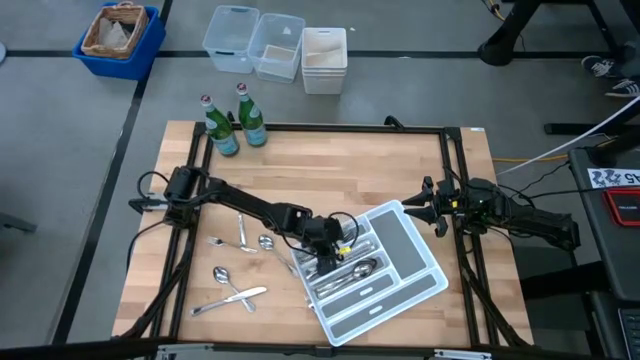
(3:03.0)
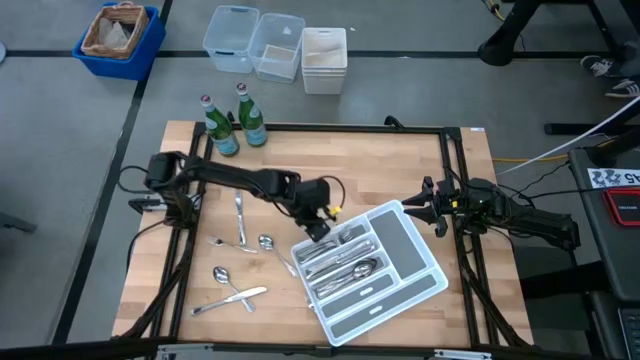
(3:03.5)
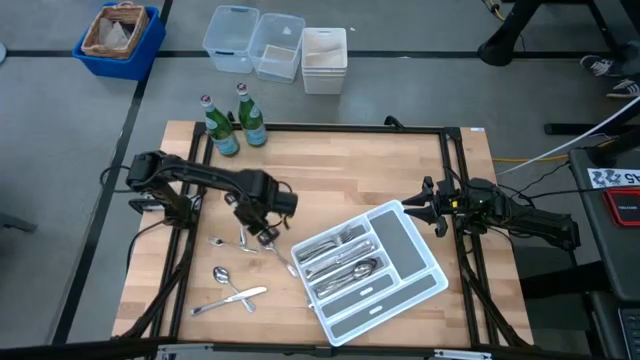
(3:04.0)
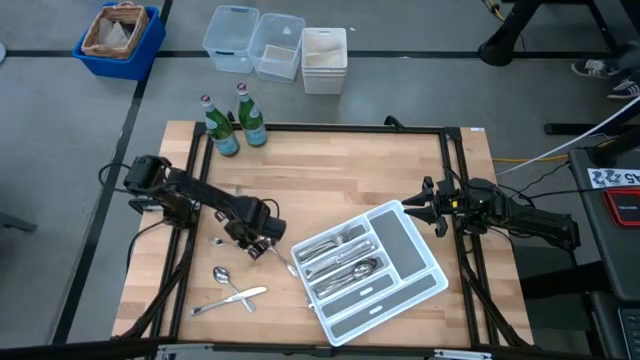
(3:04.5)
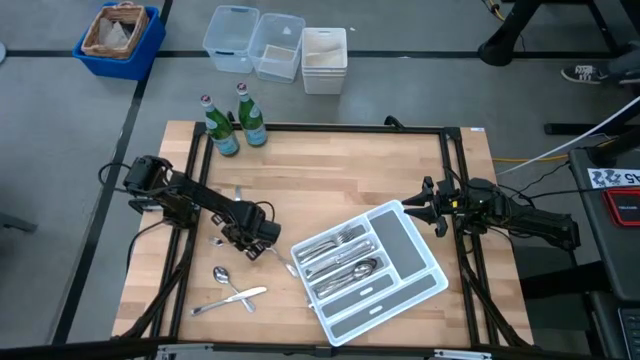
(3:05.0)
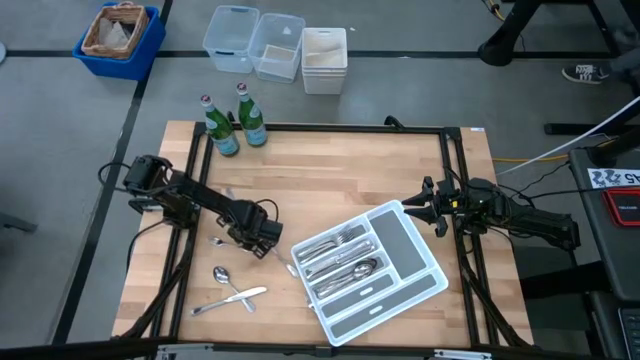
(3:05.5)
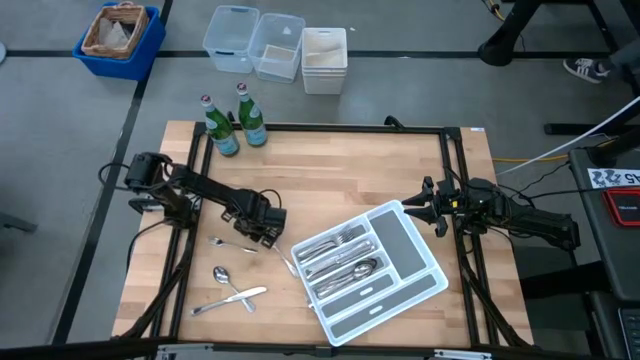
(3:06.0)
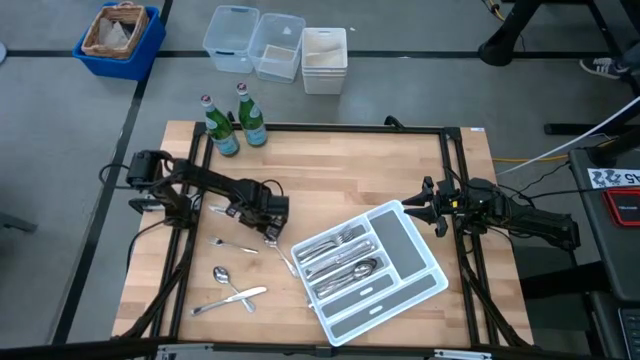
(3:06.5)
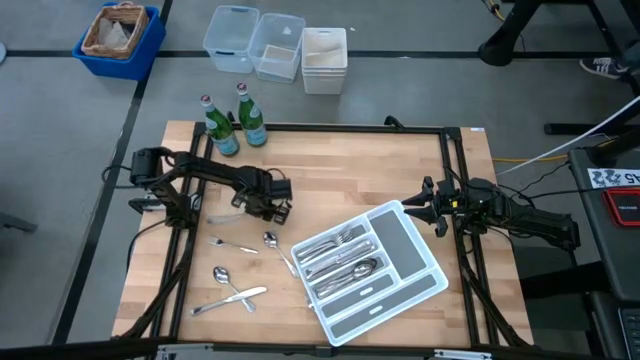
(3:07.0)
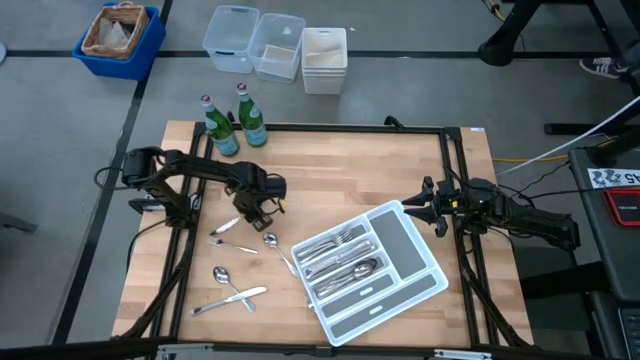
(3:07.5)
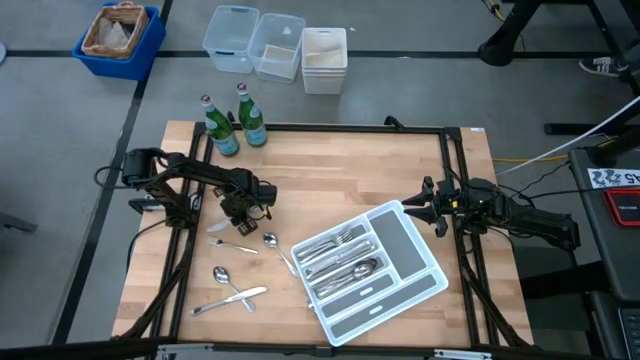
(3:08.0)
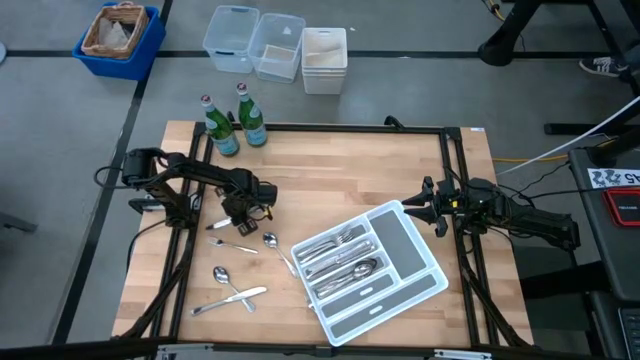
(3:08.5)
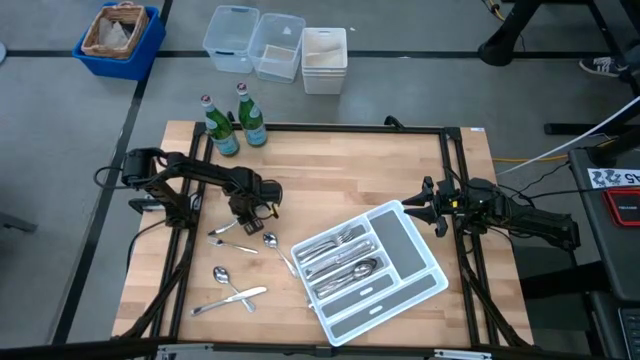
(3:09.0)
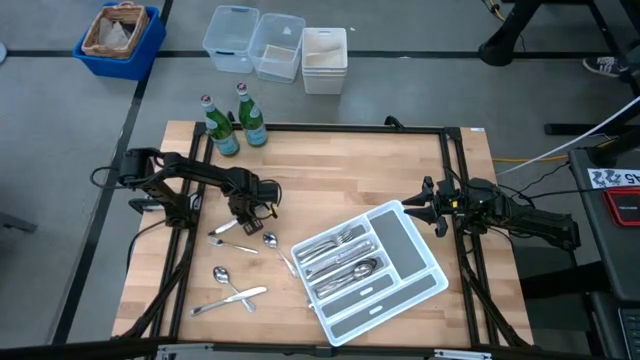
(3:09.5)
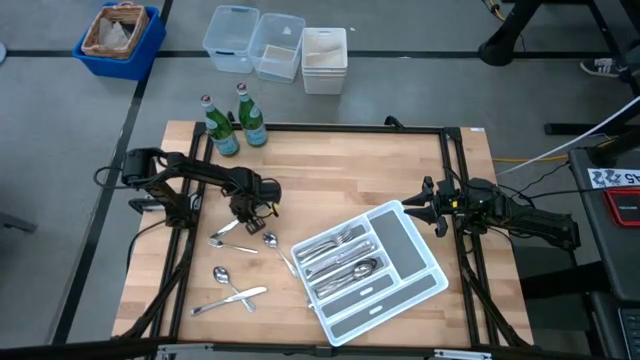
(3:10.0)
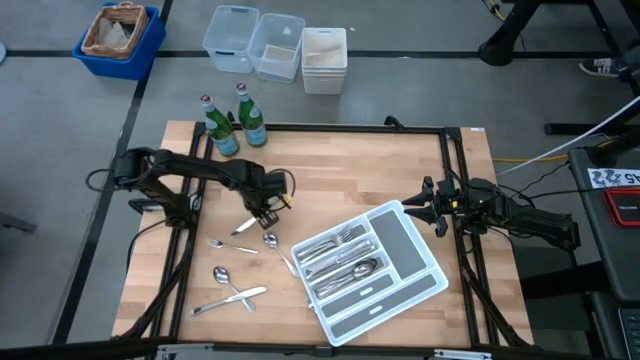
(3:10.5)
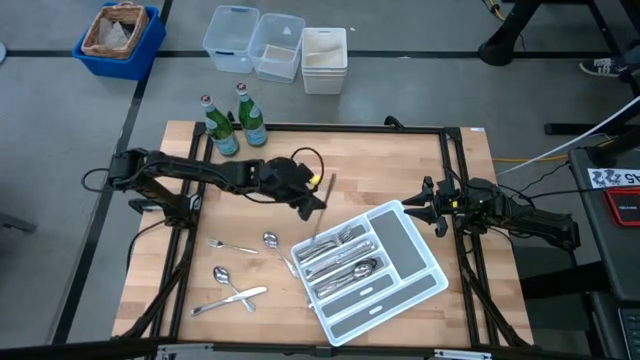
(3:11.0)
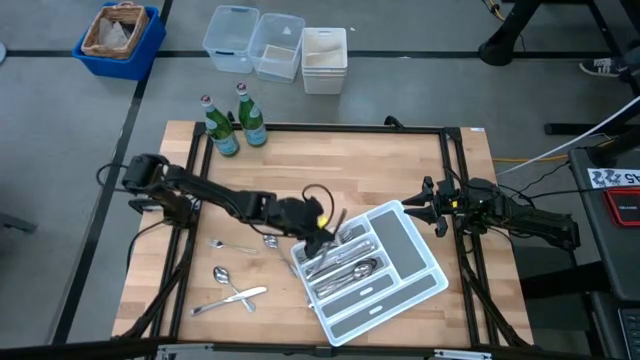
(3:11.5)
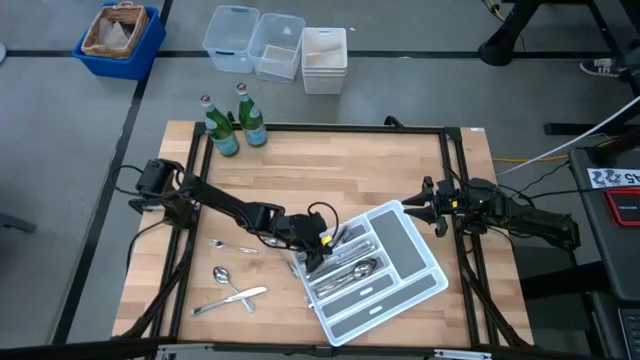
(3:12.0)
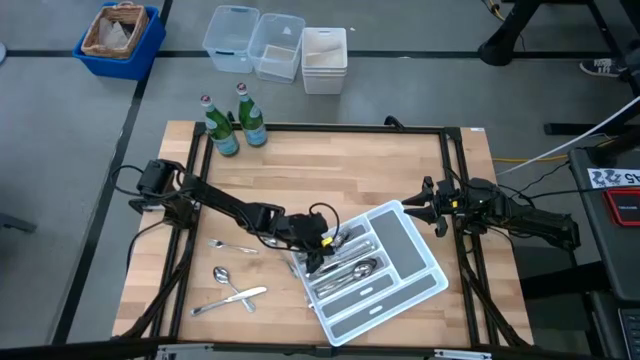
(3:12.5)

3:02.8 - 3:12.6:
Task: Sort silverware
Put the silver table knife into the white silverware tray

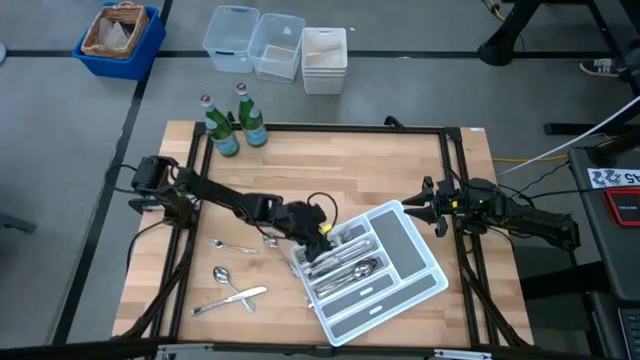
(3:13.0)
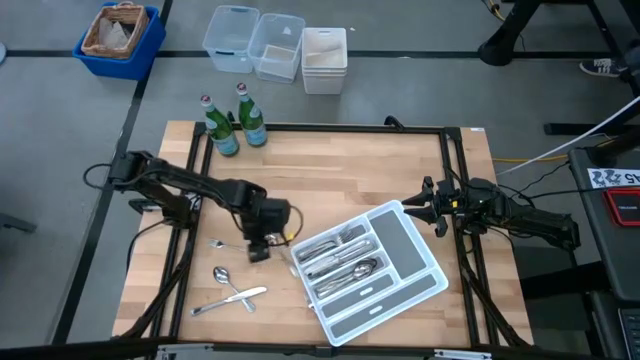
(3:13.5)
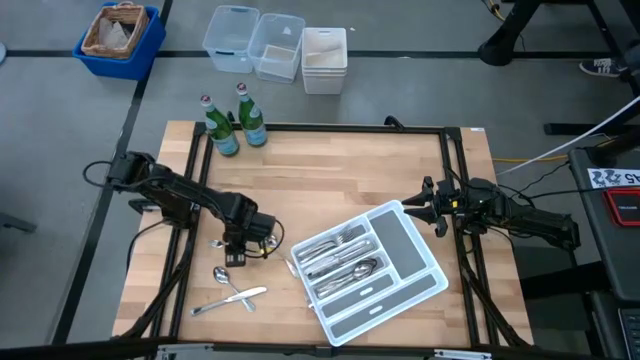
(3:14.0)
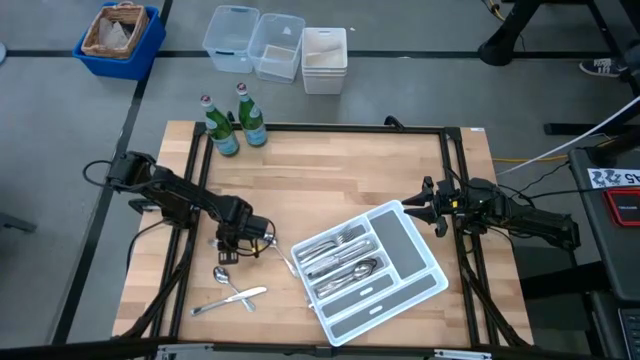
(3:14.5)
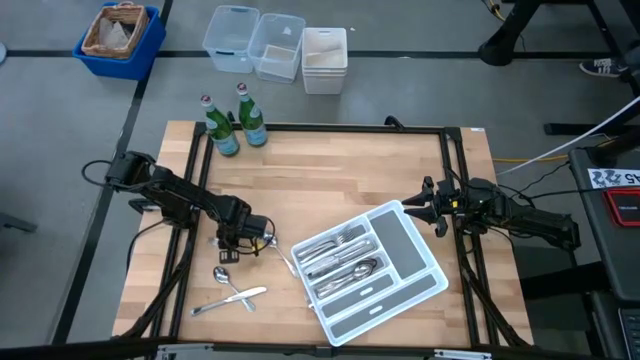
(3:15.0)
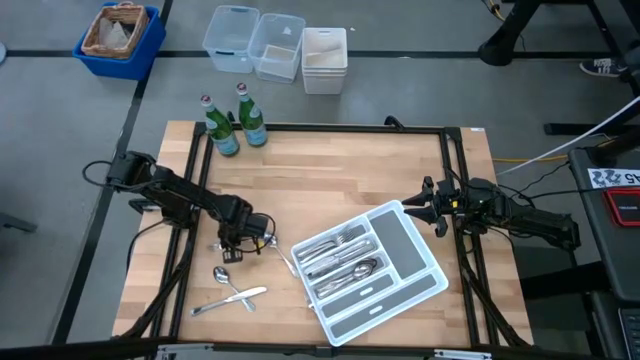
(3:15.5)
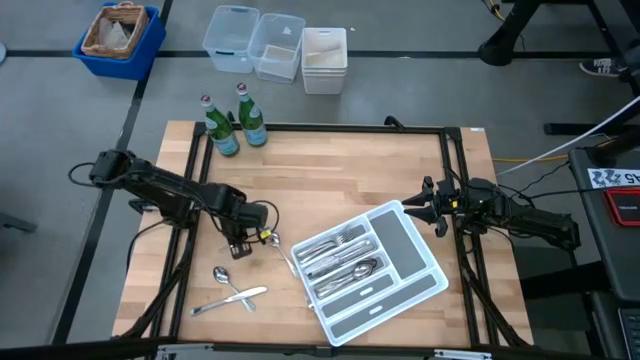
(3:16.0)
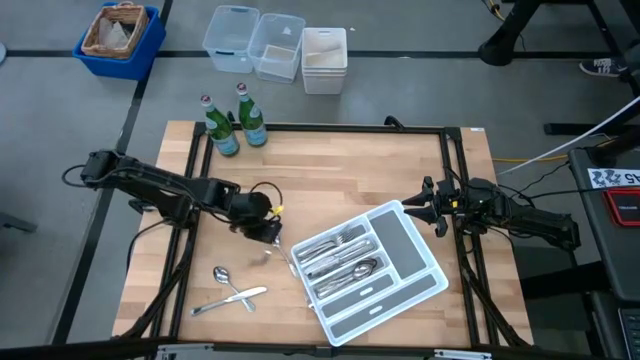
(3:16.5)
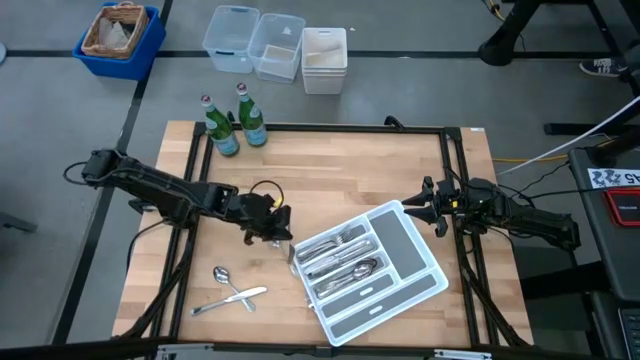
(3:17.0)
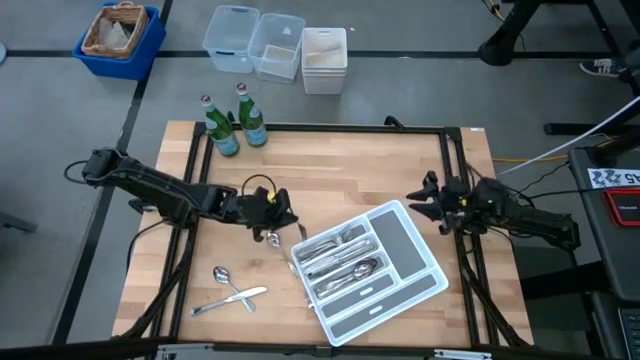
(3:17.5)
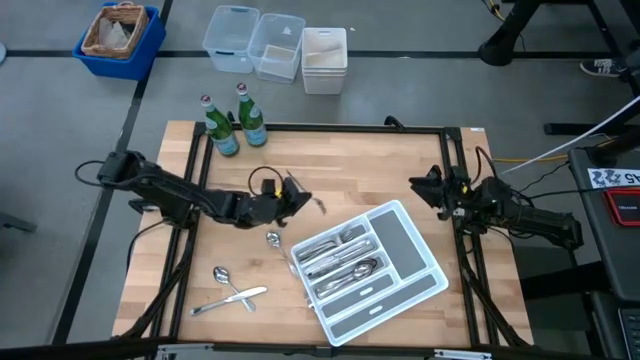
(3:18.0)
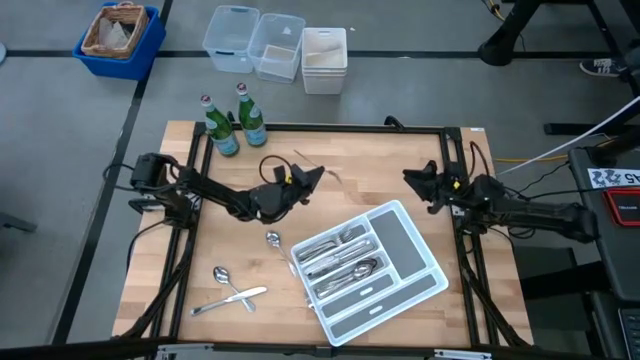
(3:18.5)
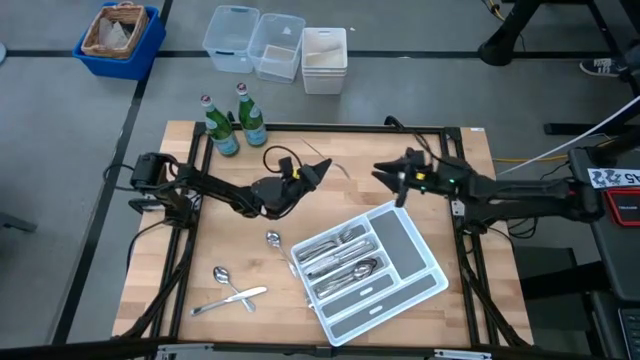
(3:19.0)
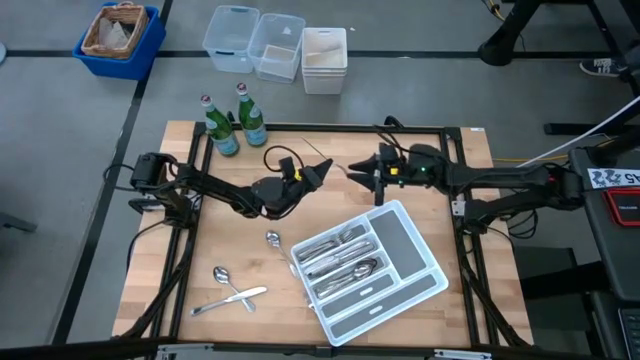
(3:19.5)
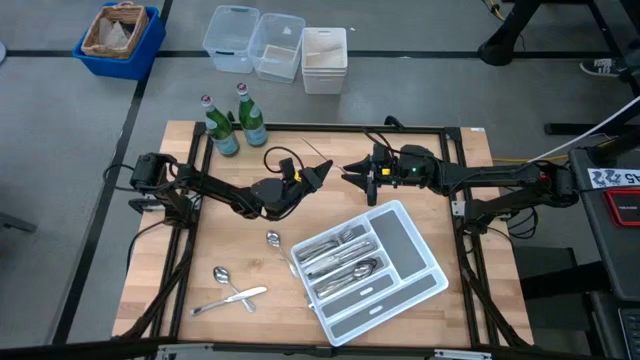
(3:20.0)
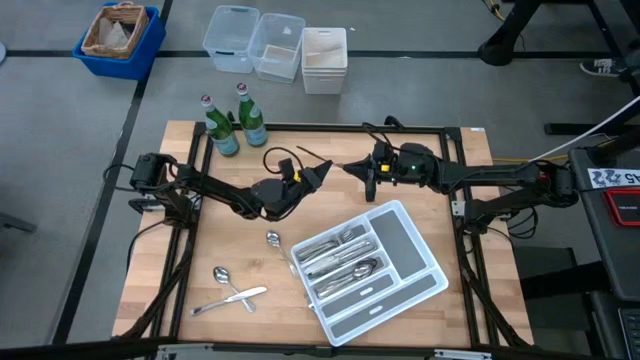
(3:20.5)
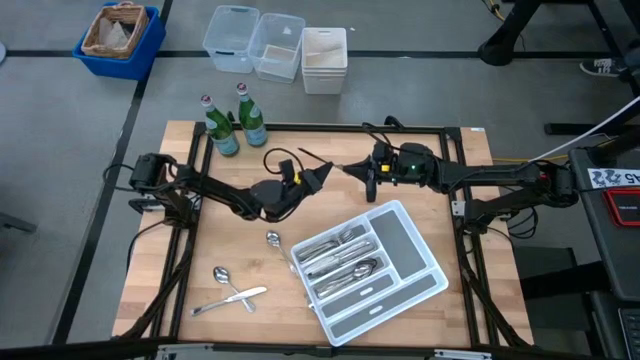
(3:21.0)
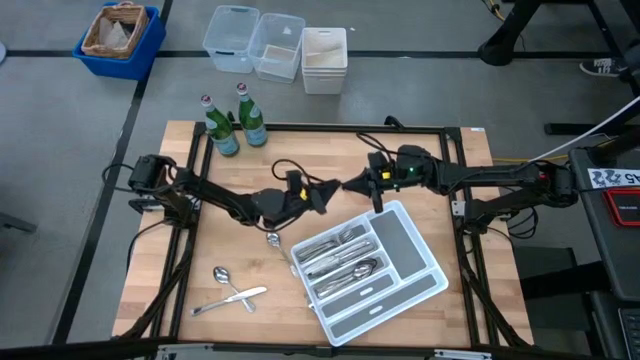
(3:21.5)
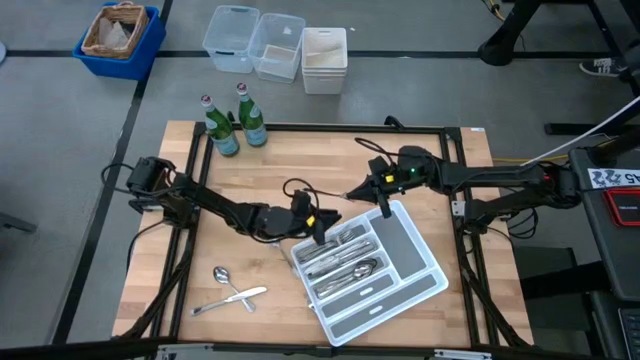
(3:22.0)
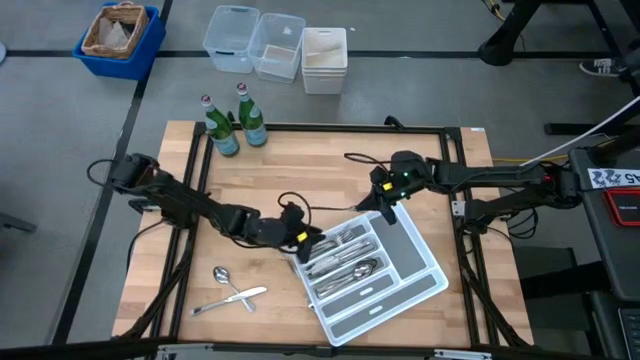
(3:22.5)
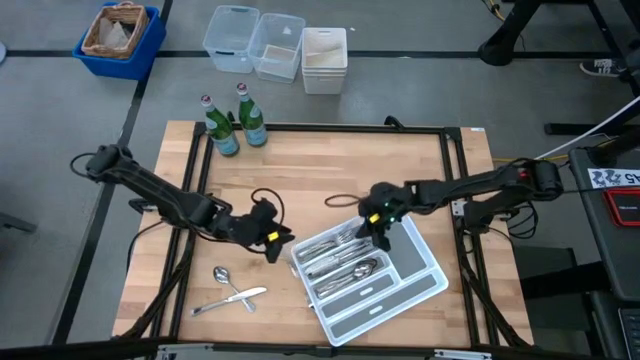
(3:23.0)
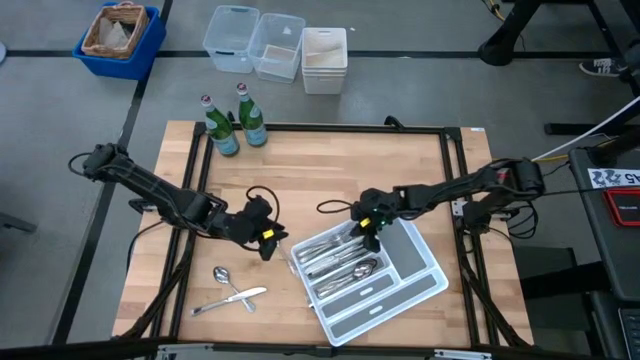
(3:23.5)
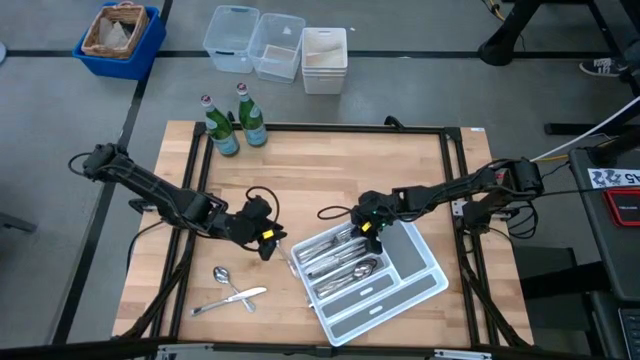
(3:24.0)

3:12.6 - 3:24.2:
Put the silver fork into the white silverware tray
